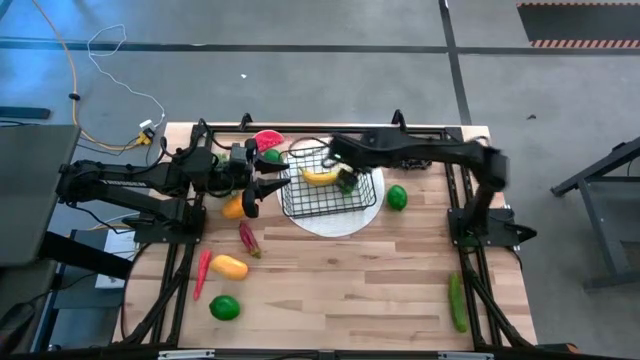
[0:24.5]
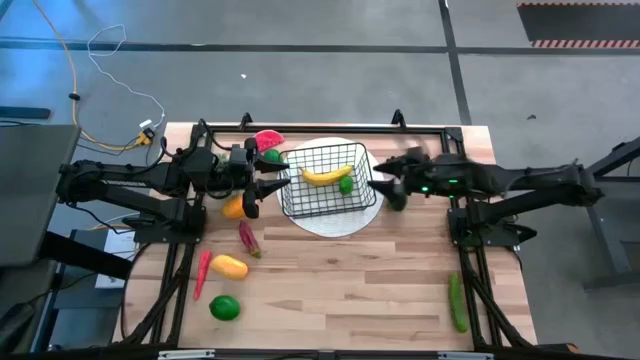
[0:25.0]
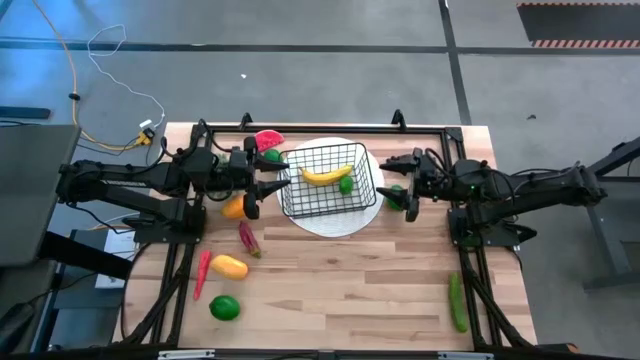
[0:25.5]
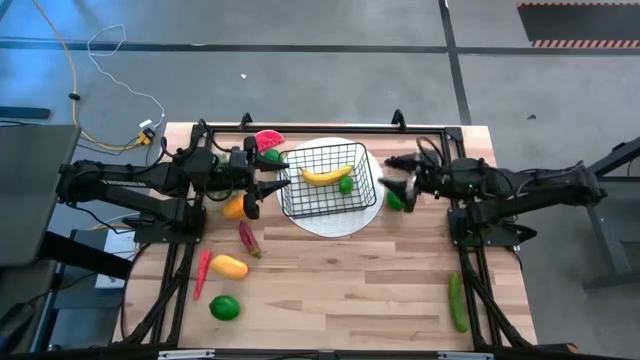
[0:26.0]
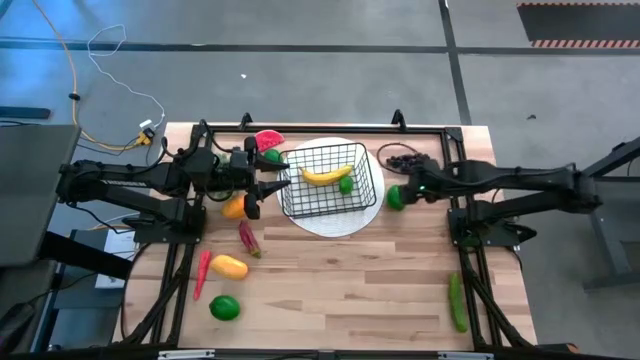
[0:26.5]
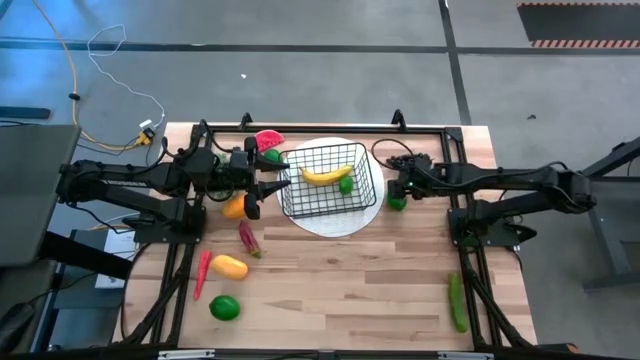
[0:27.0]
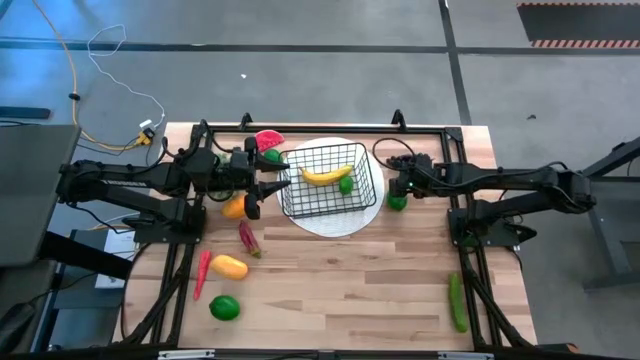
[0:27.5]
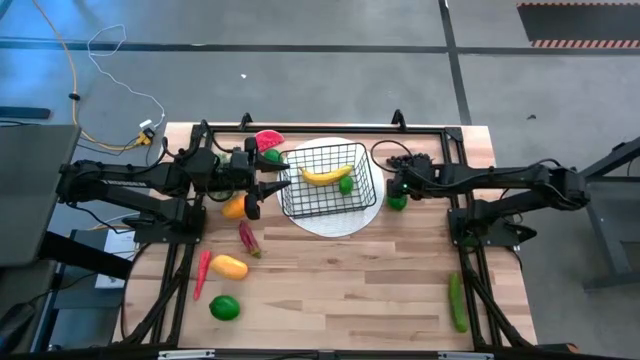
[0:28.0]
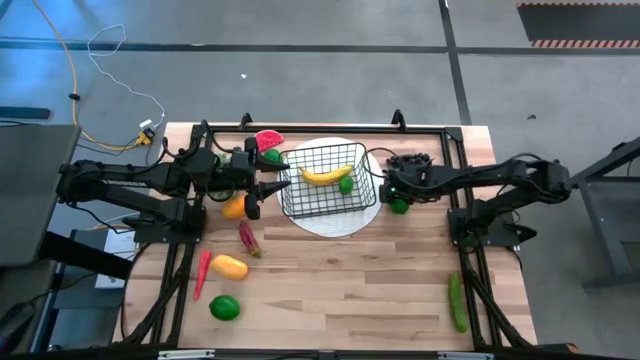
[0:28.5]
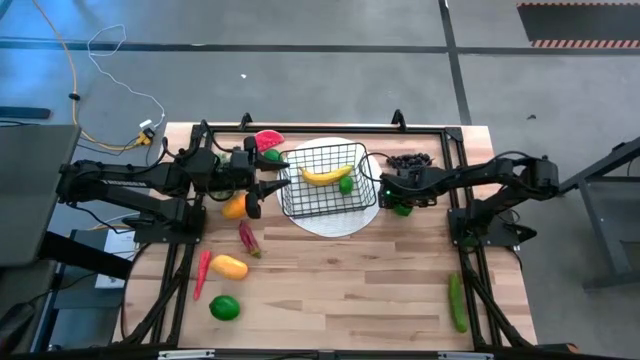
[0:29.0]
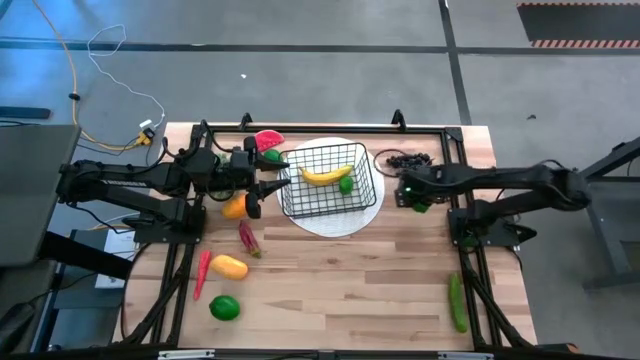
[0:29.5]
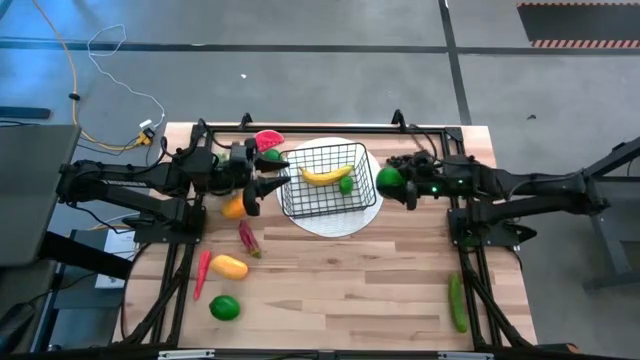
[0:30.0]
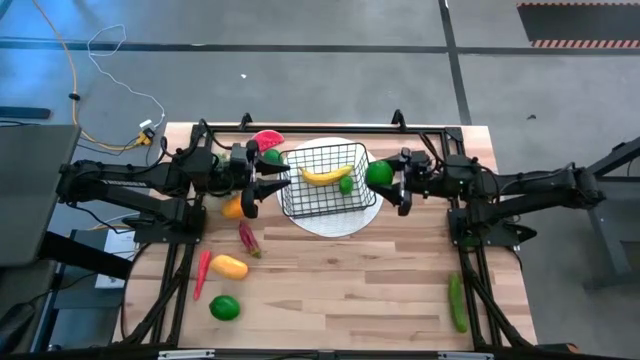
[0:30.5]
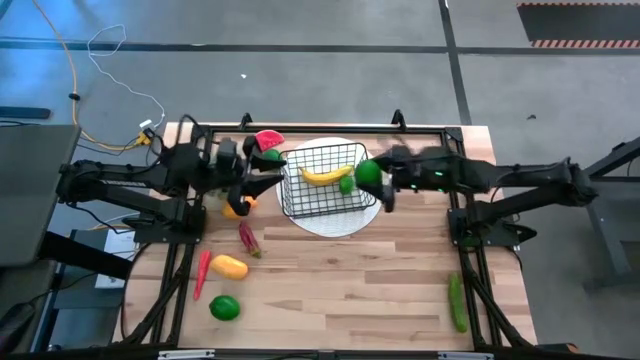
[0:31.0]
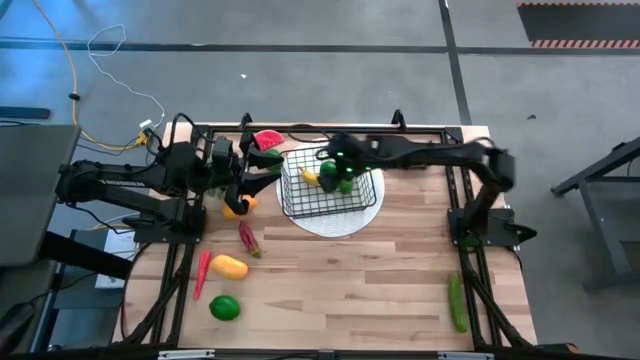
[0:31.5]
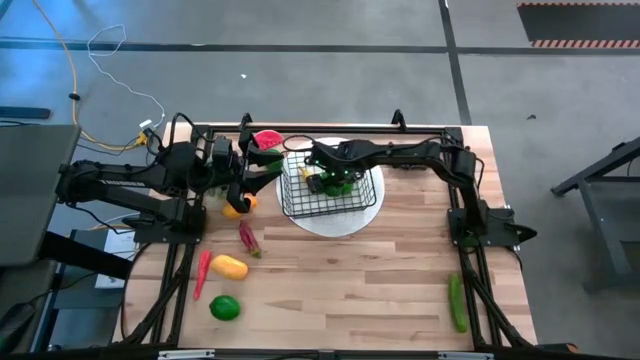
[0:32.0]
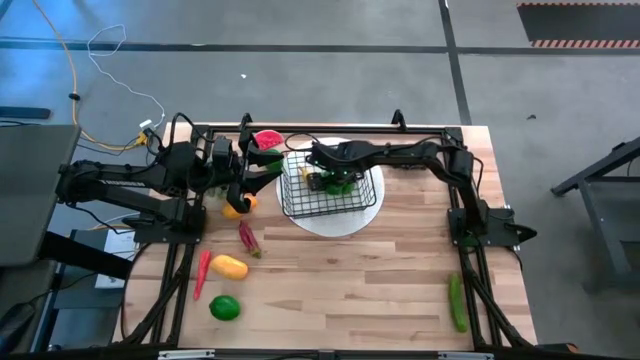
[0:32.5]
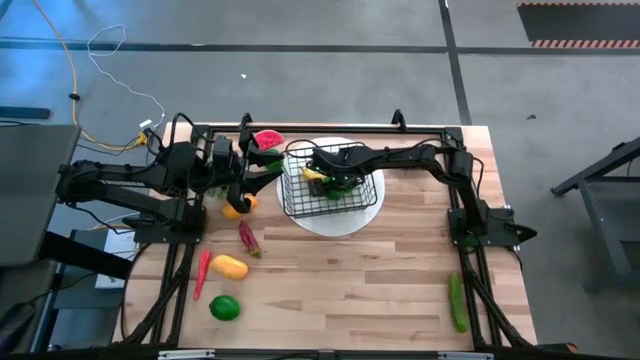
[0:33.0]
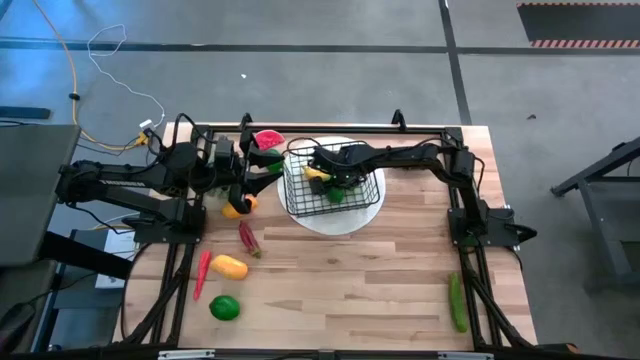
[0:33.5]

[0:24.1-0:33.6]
Task: Build produce basket
Put the green lime into the black wire basket

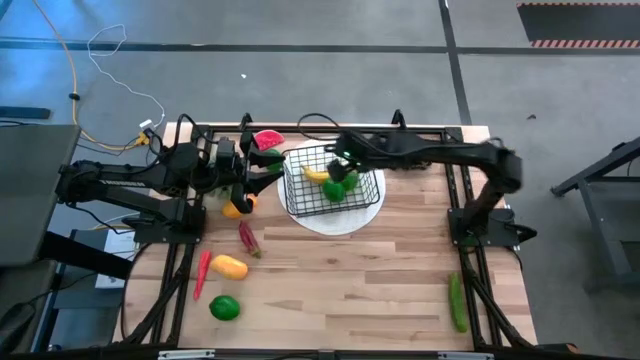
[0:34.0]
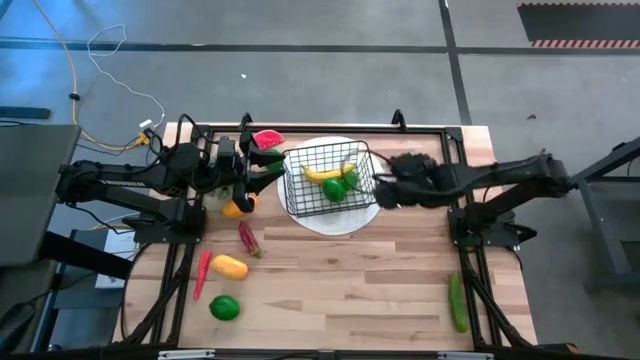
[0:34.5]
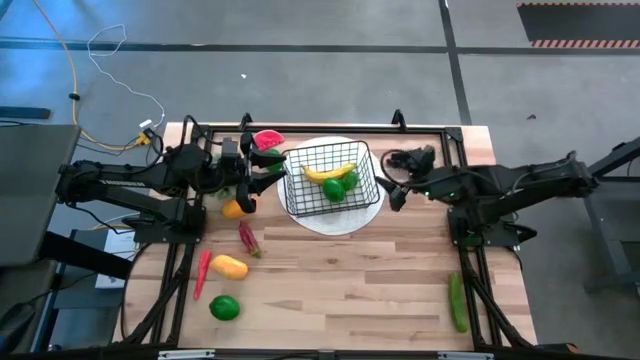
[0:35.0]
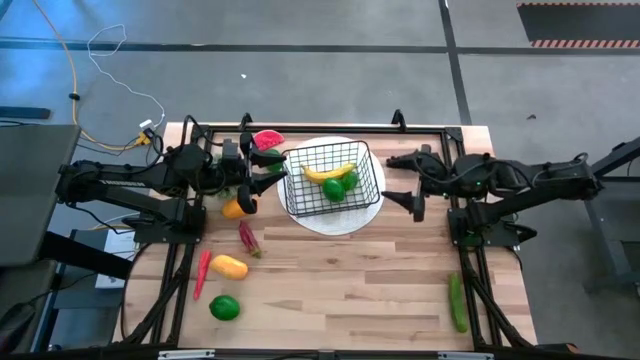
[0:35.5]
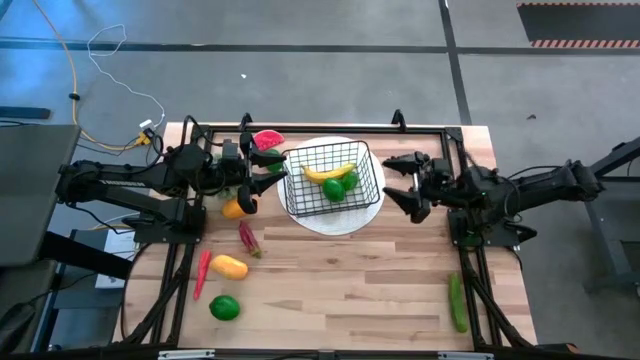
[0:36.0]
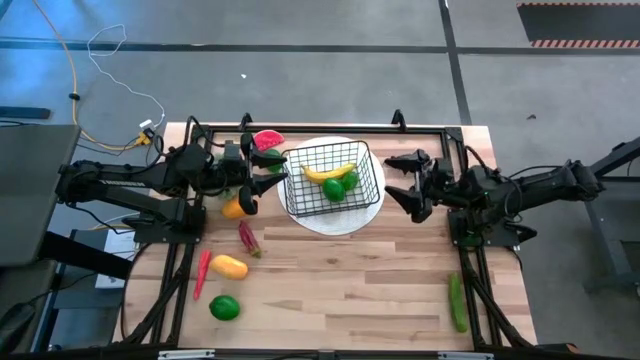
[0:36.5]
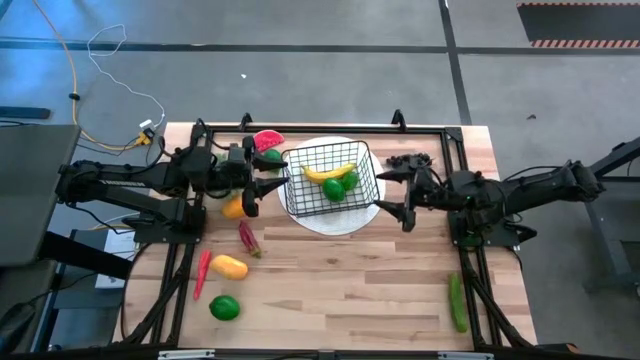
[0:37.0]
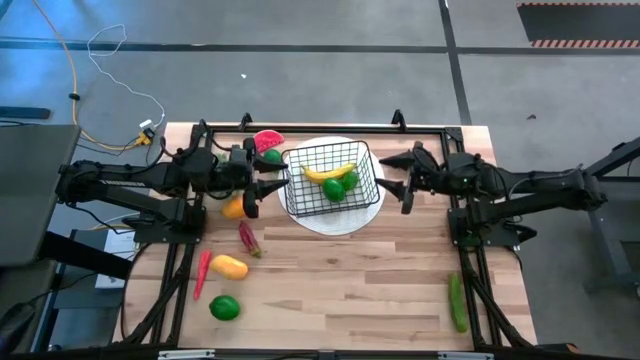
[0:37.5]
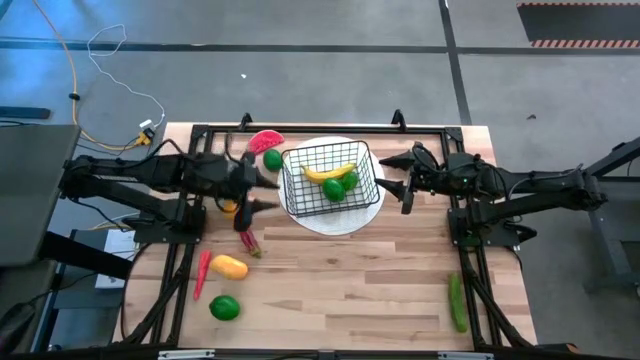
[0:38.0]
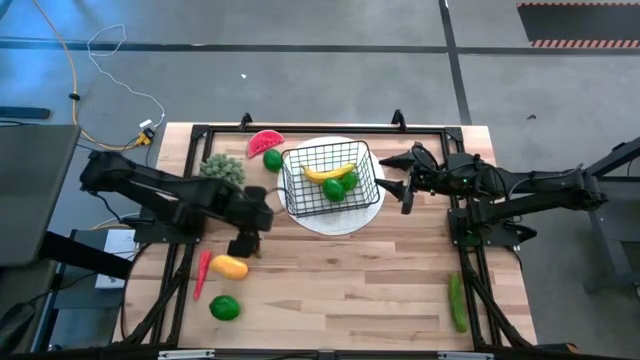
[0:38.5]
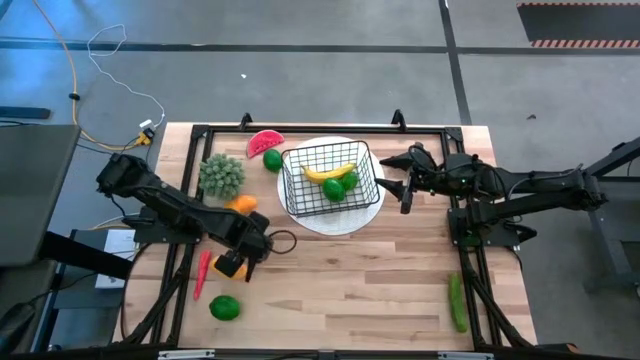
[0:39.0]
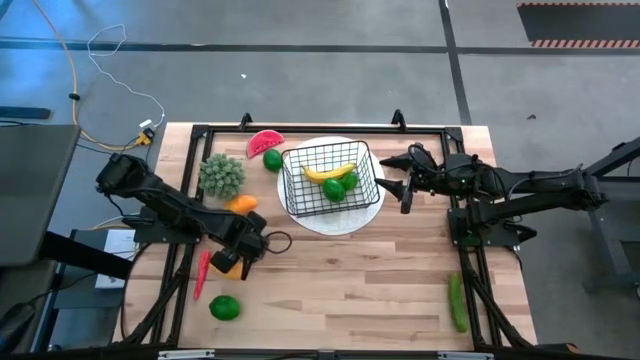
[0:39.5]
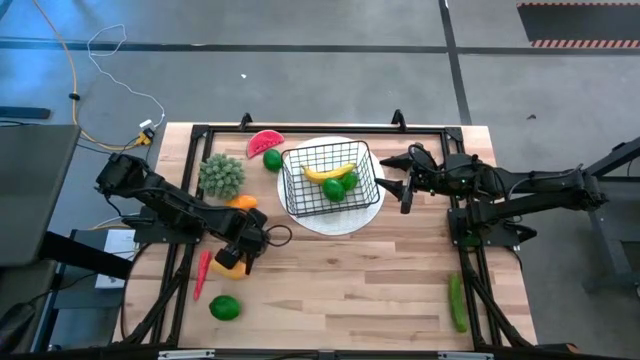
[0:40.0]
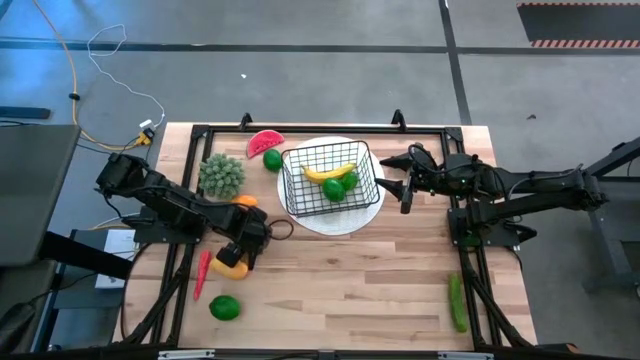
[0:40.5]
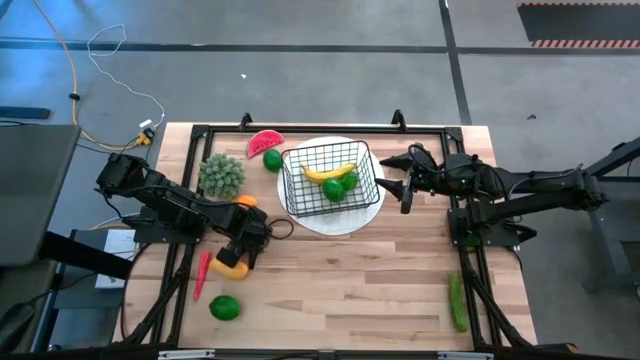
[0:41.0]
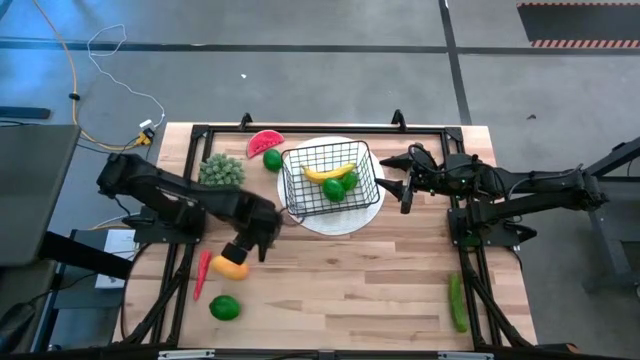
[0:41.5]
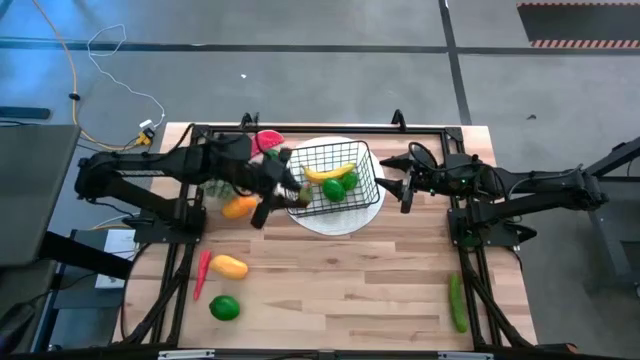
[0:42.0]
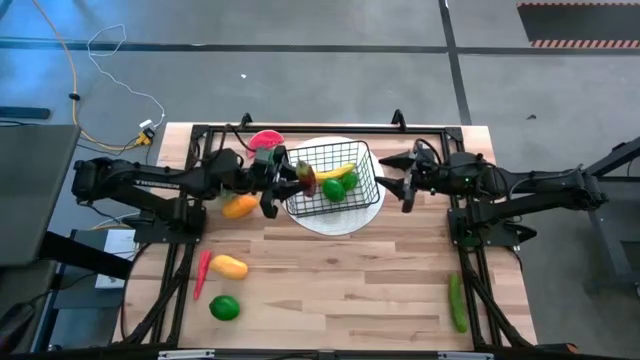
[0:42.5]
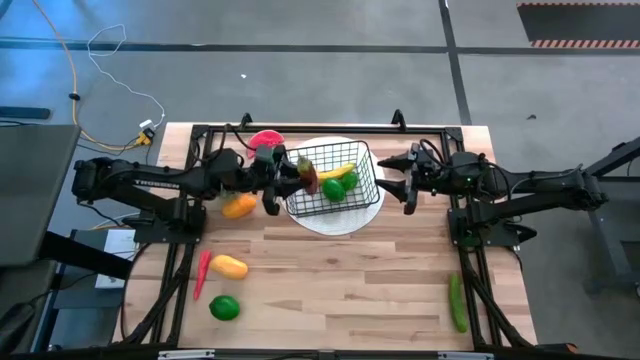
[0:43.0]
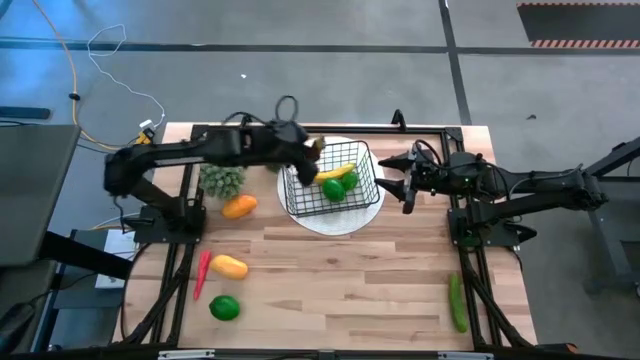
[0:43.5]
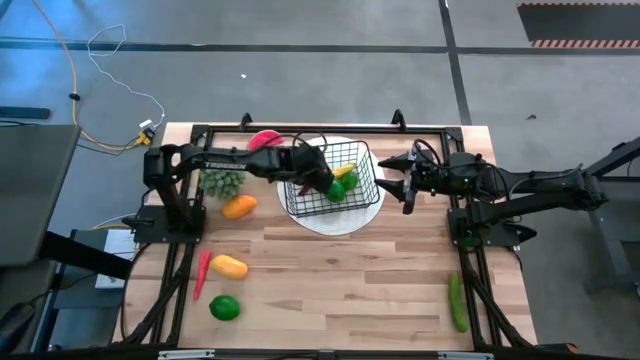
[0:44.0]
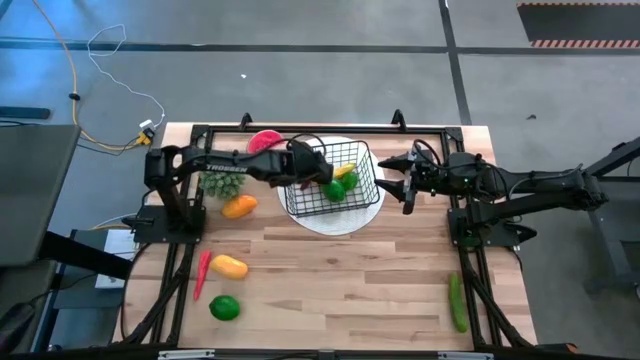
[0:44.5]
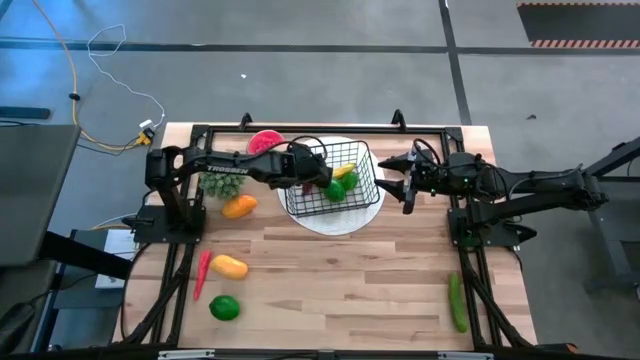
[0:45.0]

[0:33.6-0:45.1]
Put the red chili pepper into the black wire basket

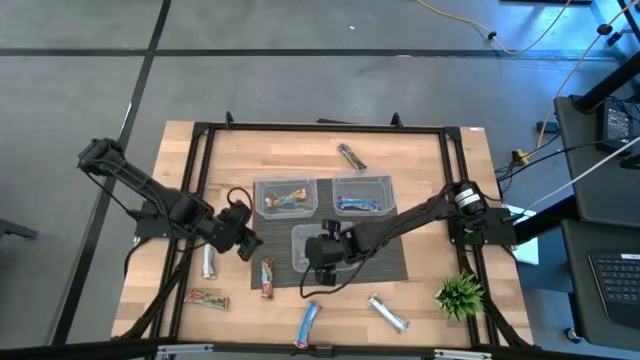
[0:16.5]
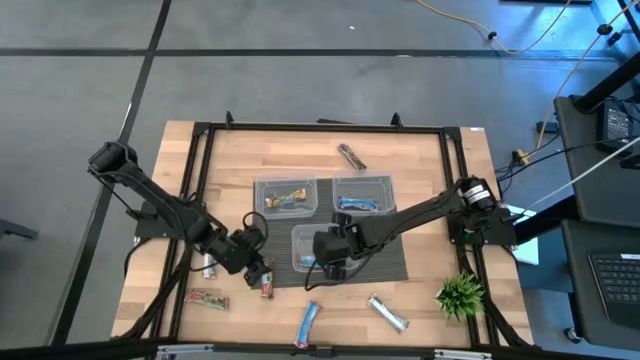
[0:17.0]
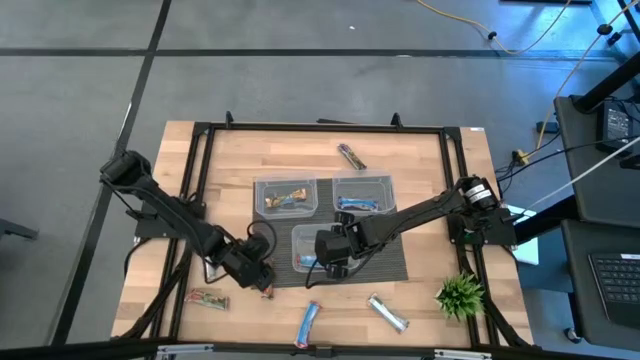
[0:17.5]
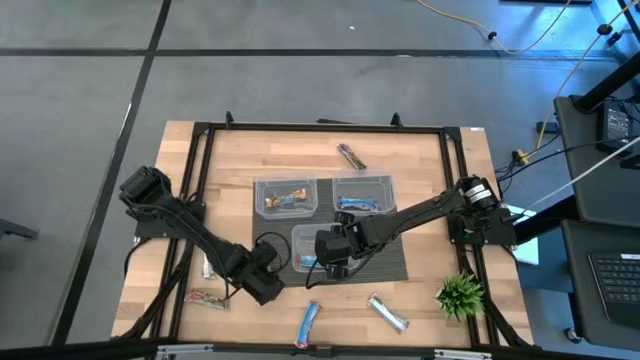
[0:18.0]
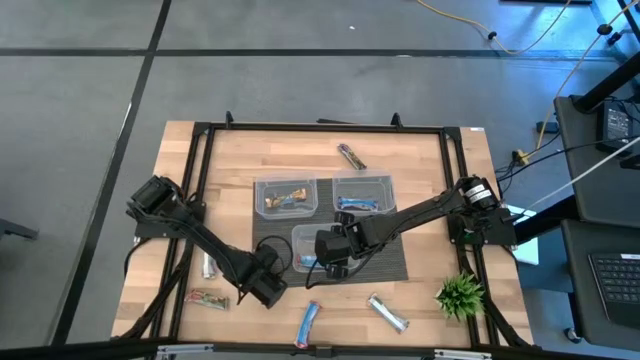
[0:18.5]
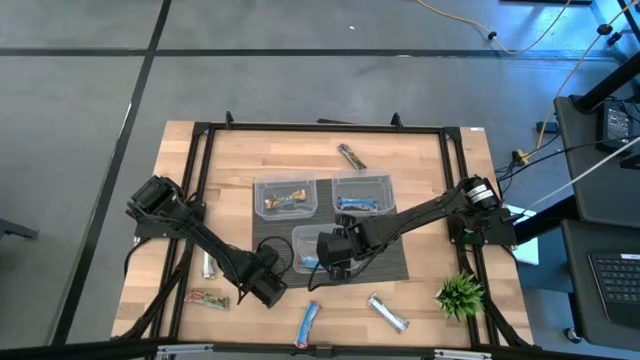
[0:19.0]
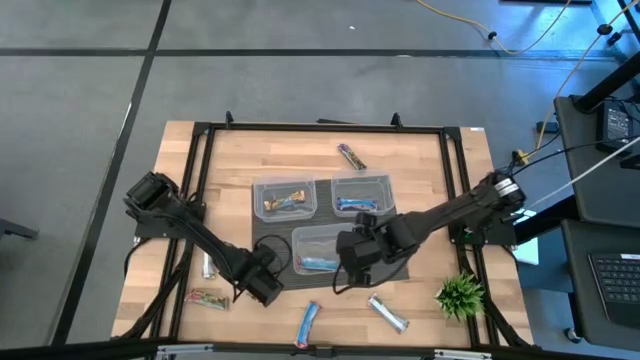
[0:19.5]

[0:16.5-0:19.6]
Task: Pick and place Granola Bars by type
Put the red granola bar into the bottom transparent bin
